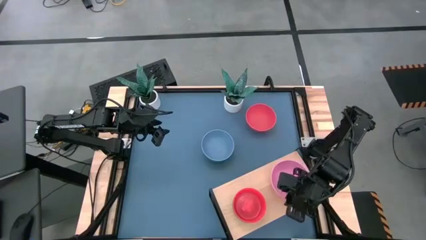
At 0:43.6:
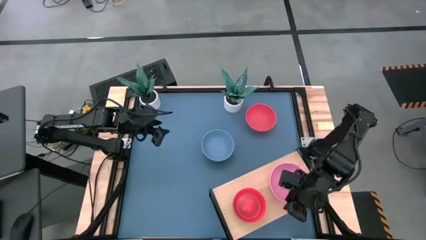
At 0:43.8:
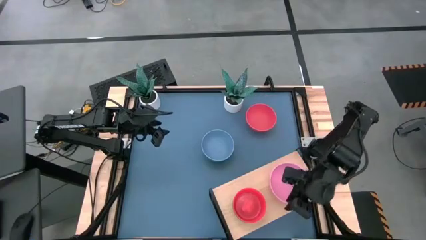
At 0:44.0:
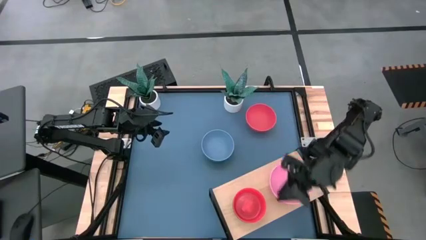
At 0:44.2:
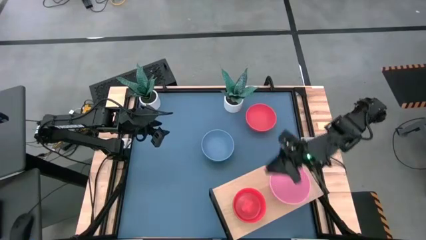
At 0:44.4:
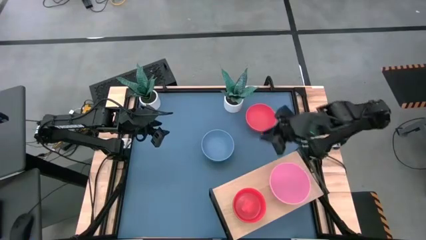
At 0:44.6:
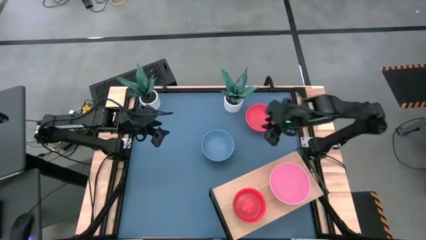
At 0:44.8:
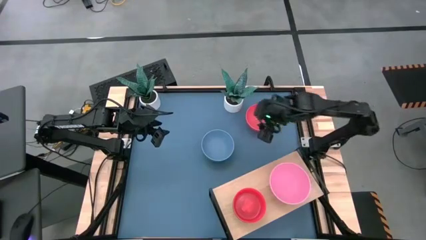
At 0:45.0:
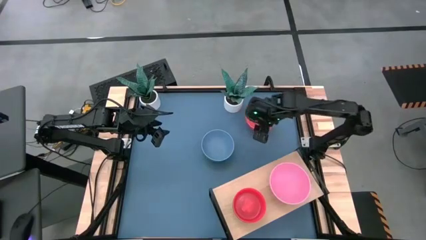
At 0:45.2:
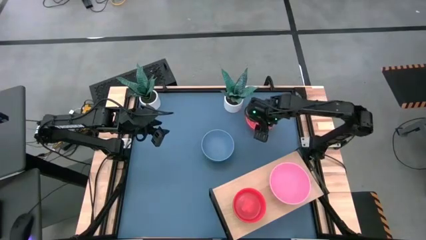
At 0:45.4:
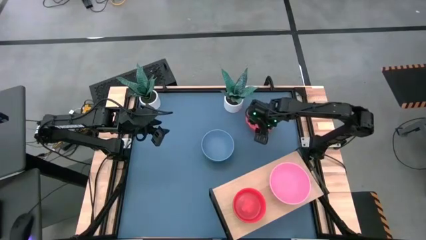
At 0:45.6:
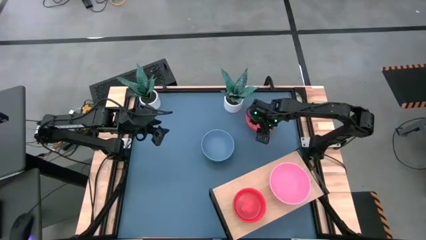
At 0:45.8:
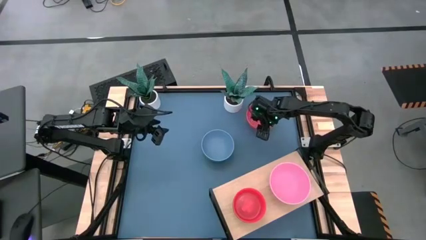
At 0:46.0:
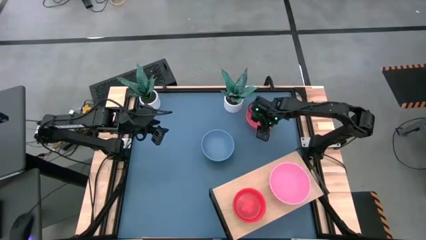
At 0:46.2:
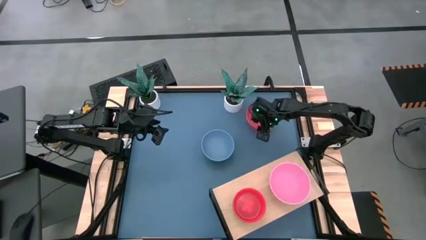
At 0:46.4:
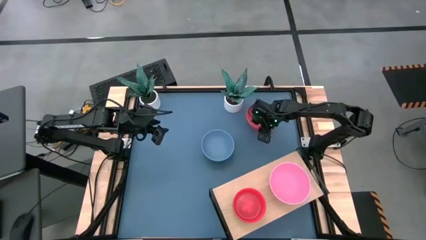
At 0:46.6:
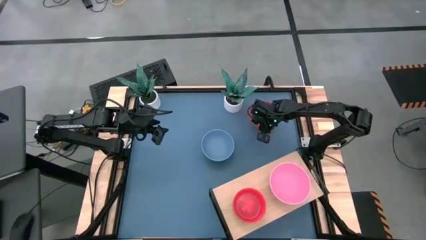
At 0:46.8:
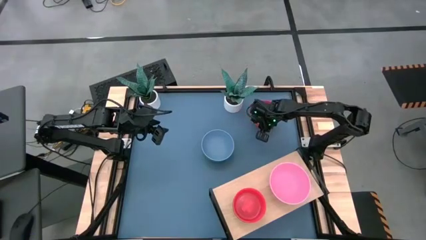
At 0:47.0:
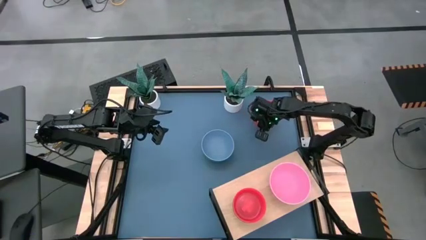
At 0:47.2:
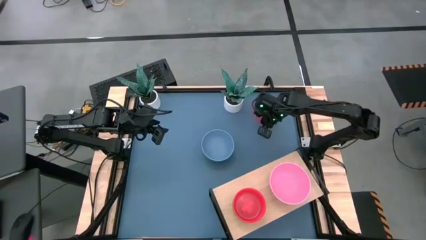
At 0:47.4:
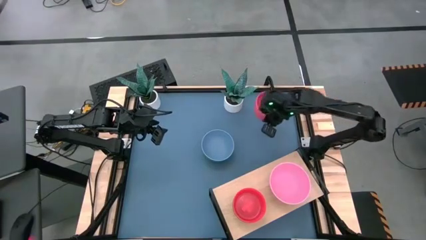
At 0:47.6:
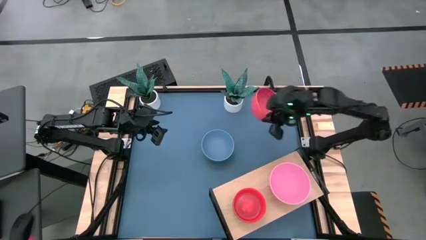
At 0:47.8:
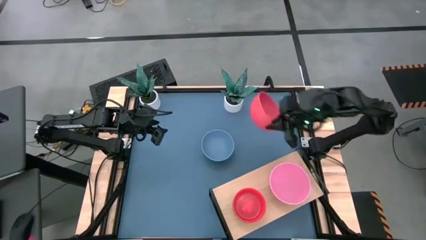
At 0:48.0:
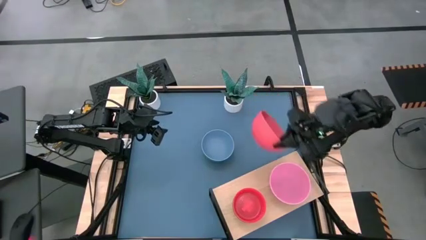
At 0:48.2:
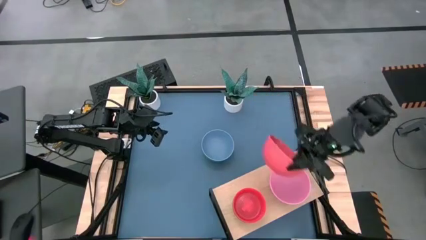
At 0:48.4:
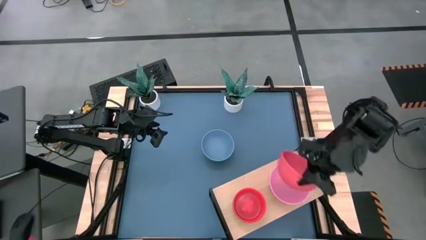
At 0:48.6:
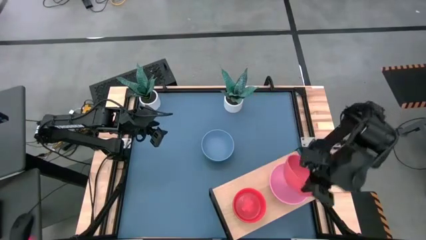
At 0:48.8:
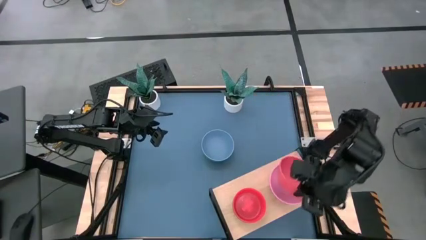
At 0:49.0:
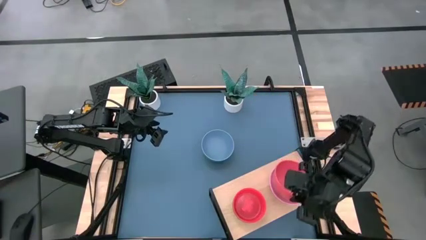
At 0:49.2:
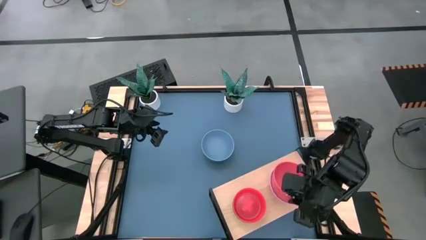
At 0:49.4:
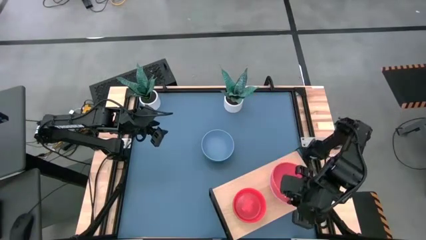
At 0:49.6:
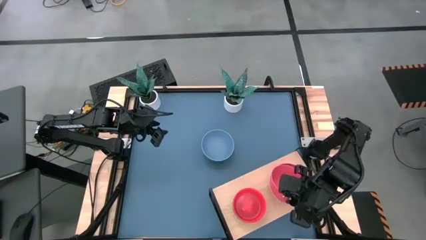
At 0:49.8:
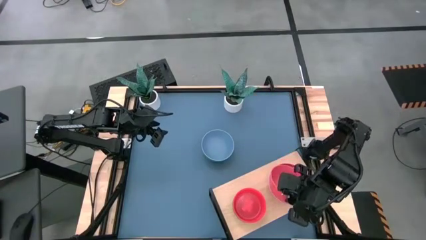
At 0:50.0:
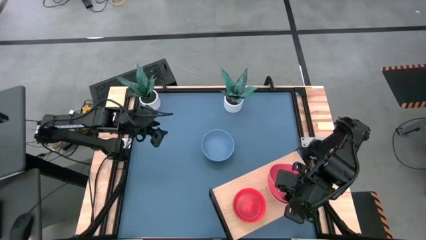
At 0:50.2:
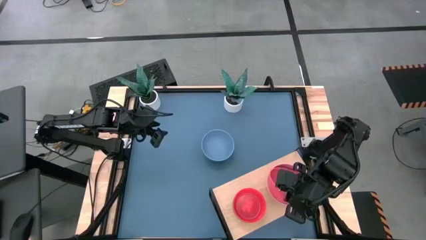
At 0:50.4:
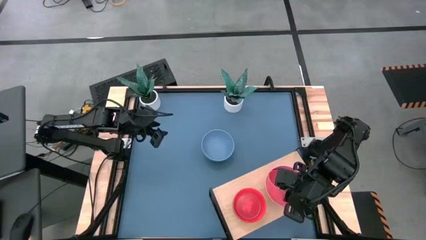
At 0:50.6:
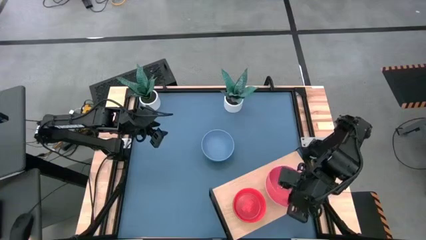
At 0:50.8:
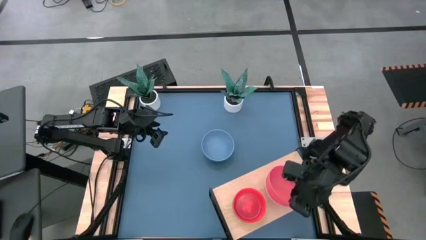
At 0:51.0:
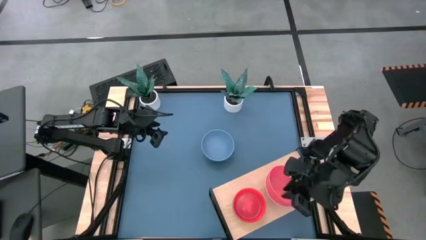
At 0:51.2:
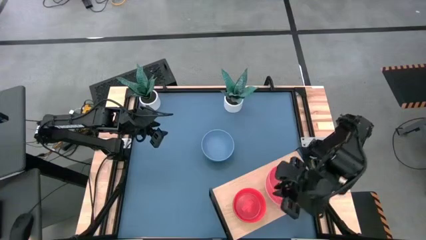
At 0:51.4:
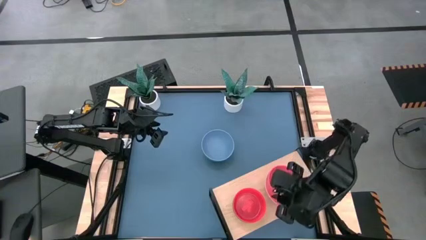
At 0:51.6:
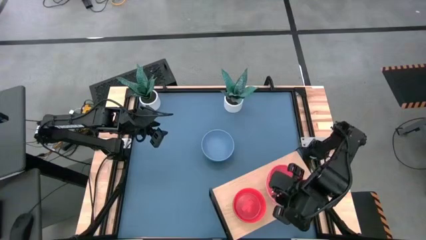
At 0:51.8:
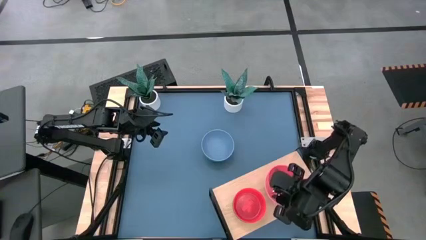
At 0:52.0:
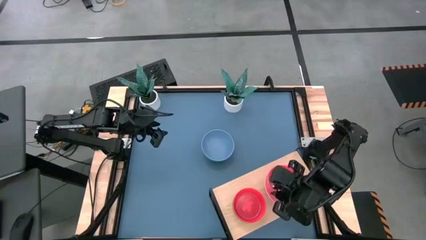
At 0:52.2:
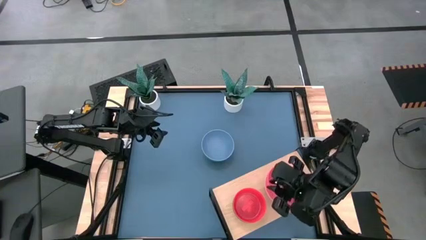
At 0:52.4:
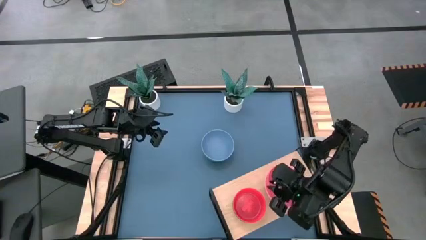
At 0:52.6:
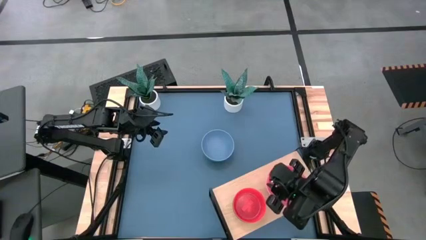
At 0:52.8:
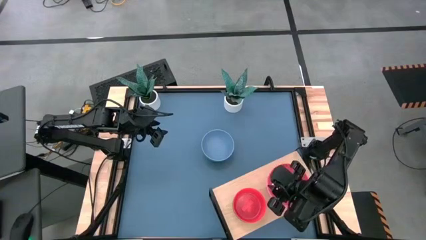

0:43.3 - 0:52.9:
Task: Place and stack bowls onto a shelf
Stack the orange bowl on top of the pink bowl on the shelf

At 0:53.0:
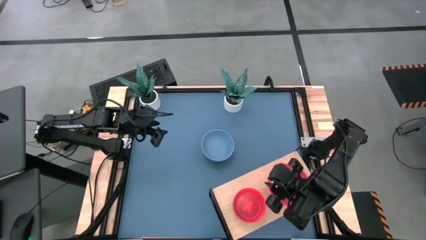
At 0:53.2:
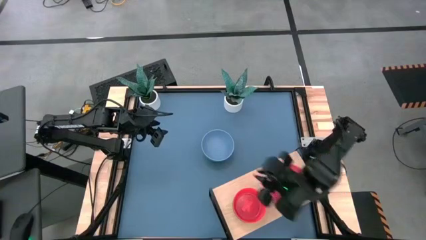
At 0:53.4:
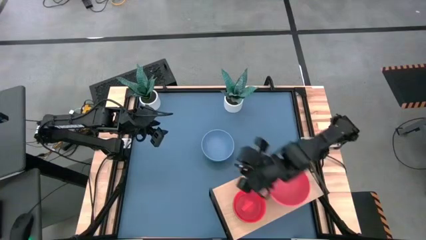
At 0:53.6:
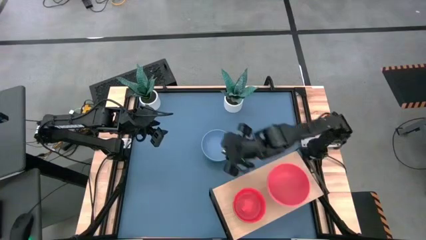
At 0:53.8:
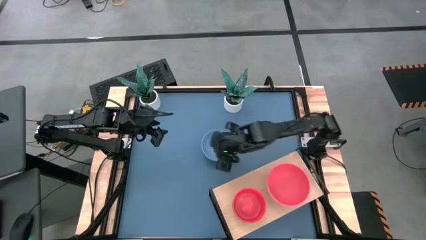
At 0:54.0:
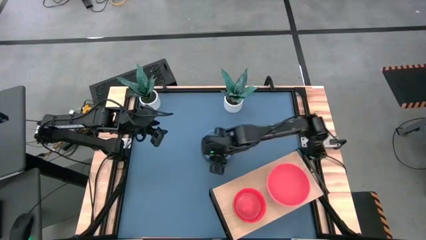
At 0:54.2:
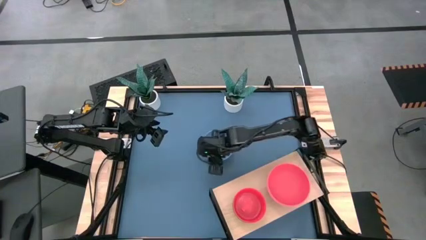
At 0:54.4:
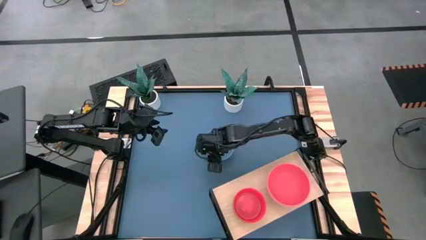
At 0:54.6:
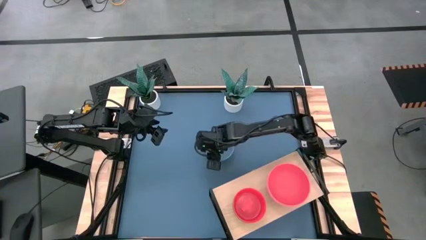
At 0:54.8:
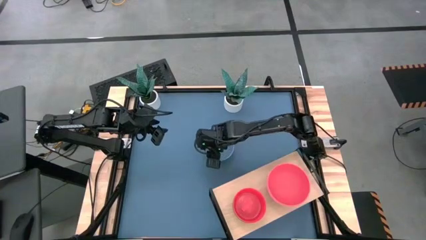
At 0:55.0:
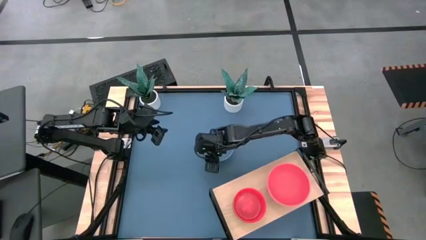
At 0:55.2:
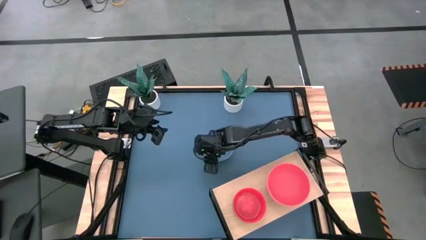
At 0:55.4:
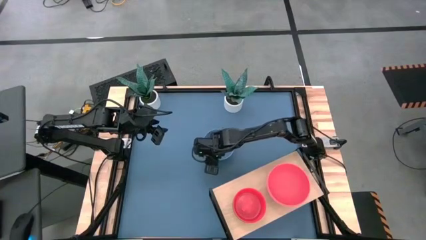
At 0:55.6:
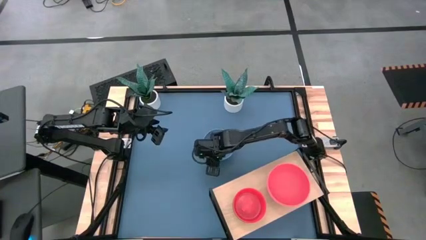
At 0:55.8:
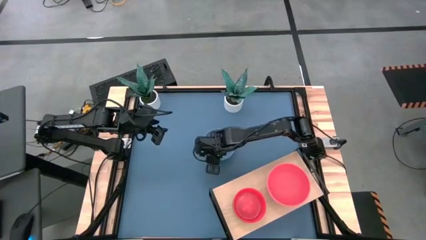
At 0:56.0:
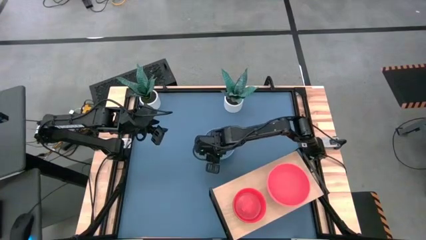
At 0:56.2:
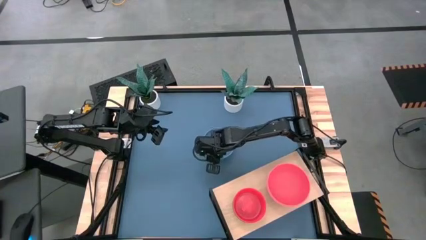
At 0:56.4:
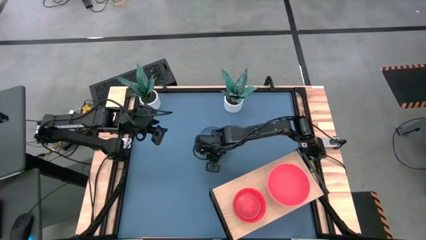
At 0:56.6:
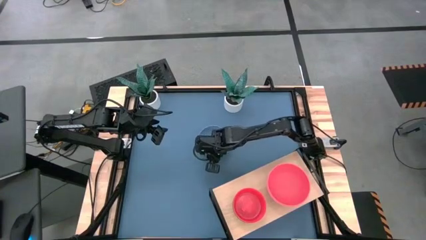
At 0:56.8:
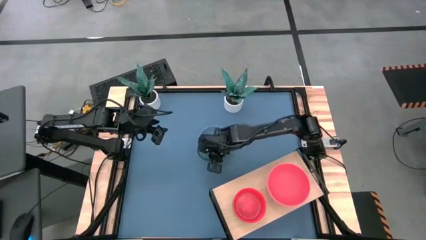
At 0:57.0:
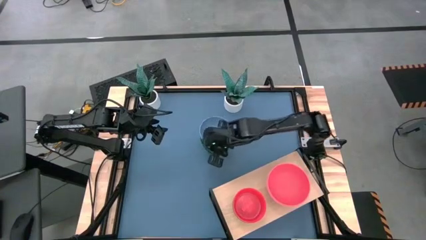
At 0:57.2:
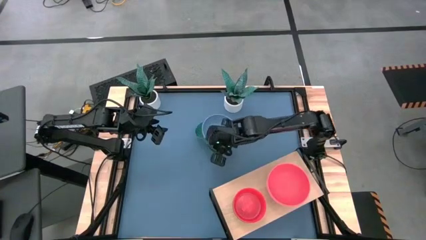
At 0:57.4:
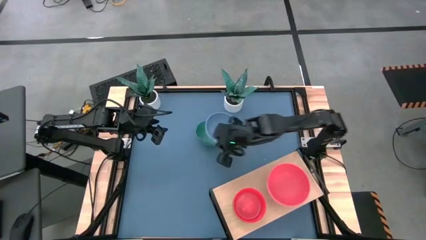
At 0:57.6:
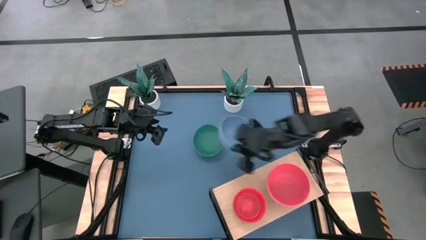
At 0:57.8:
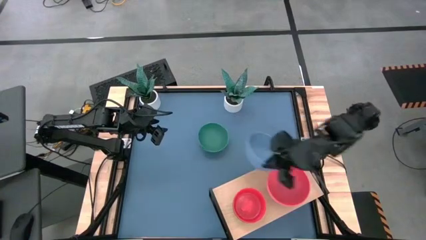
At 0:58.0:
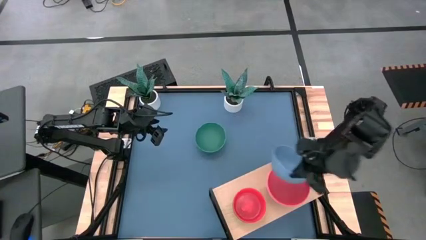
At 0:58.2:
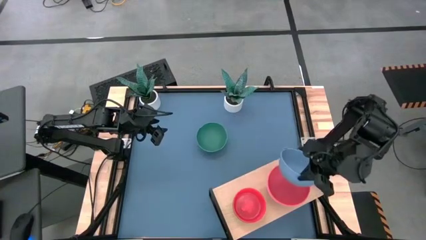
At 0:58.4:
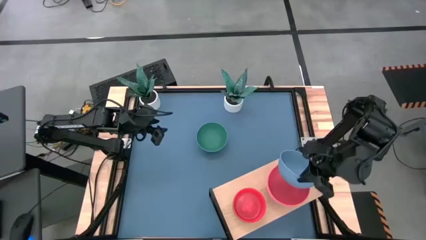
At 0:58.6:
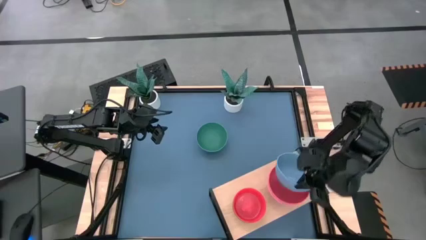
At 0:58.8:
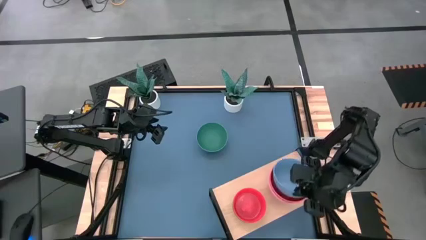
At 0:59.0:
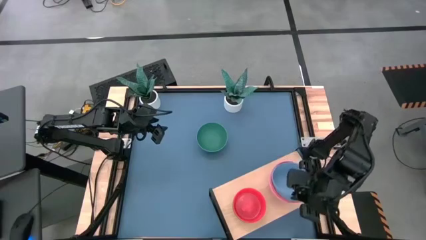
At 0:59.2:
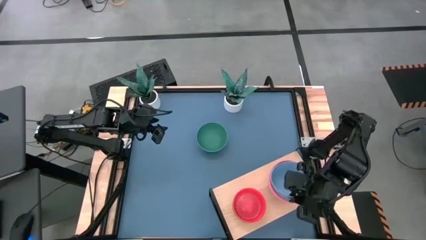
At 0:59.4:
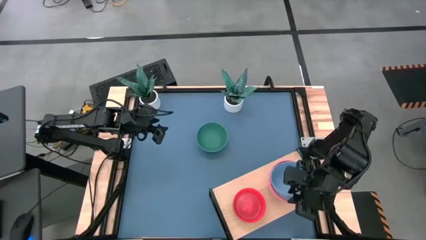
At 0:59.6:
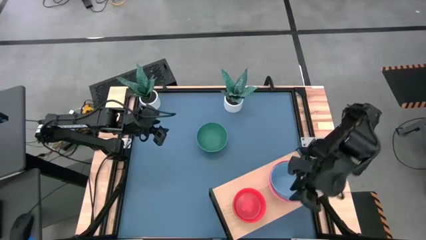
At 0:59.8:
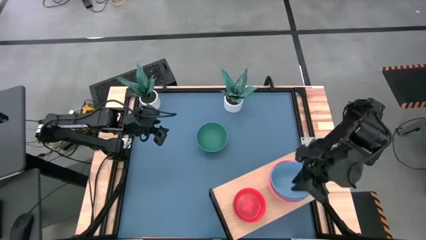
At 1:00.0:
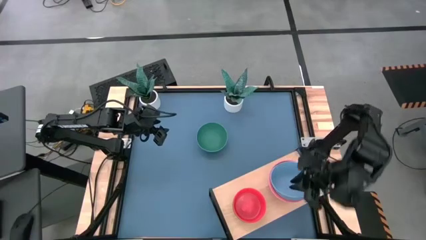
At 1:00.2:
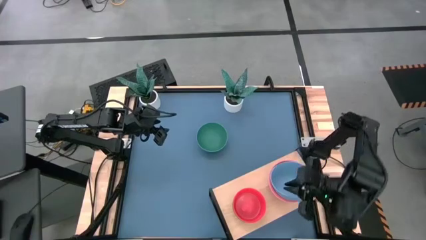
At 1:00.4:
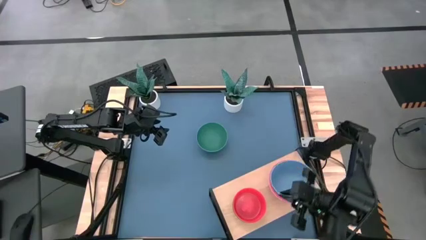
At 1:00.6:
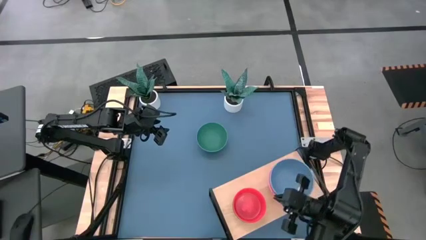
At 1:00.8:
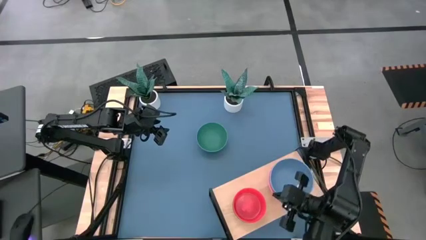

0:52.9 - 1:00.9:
Stack the blue bowl on top of the orange bowl on the shelf
